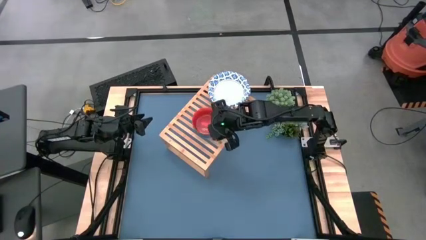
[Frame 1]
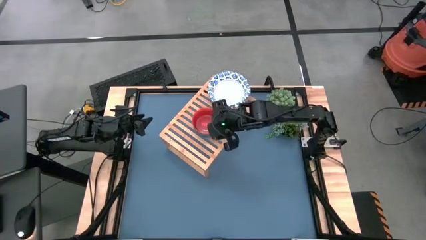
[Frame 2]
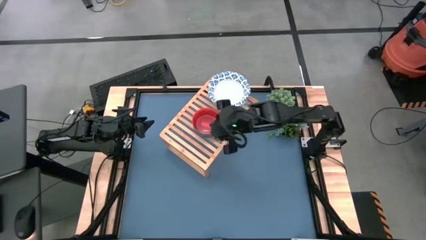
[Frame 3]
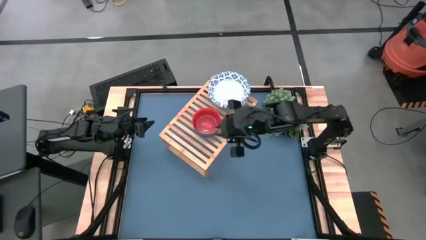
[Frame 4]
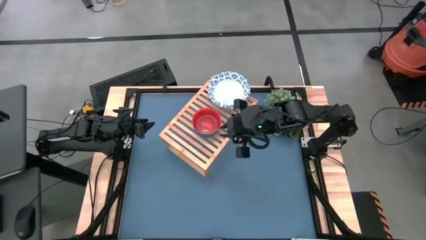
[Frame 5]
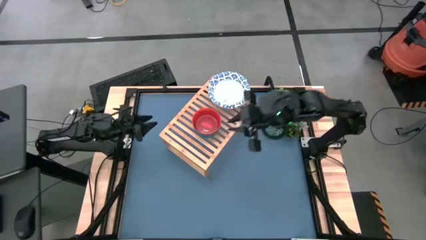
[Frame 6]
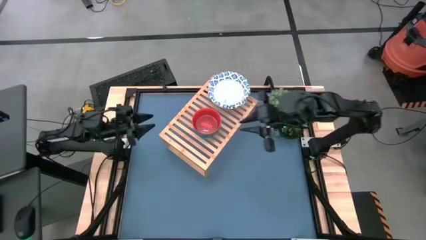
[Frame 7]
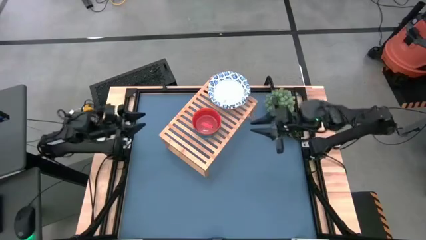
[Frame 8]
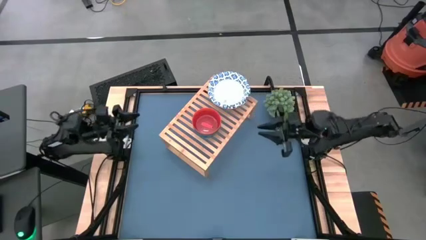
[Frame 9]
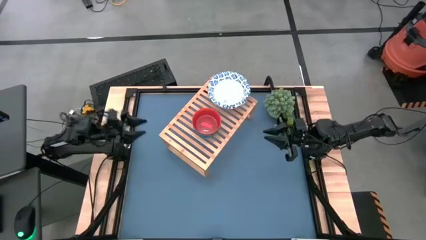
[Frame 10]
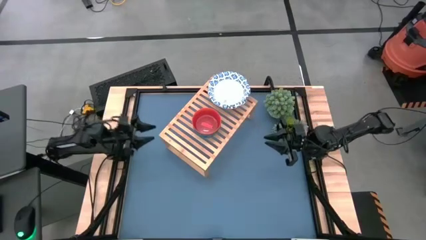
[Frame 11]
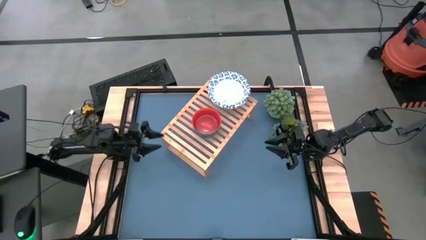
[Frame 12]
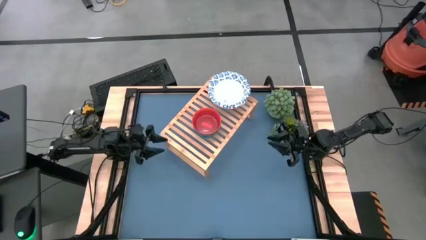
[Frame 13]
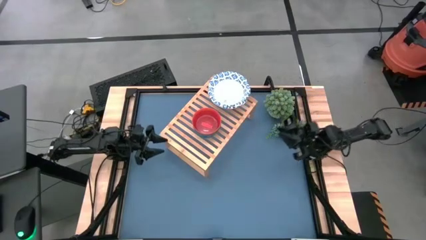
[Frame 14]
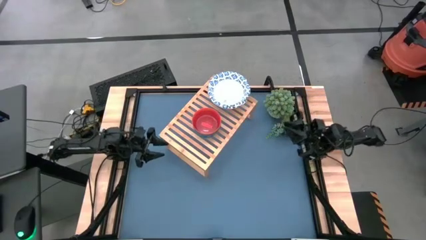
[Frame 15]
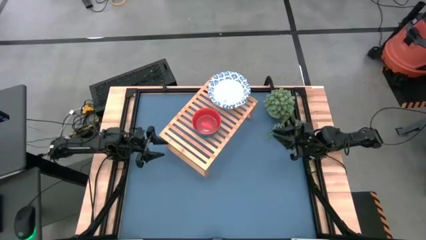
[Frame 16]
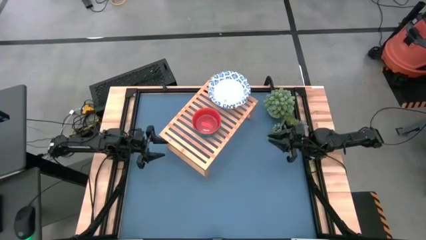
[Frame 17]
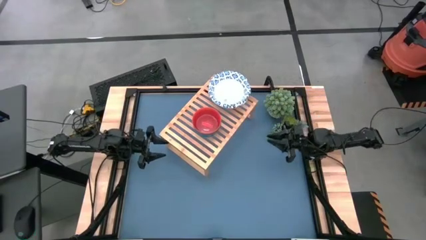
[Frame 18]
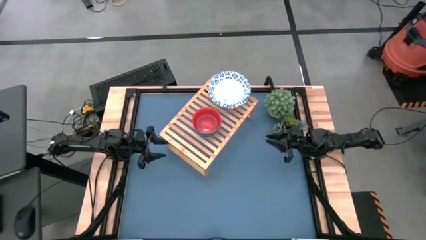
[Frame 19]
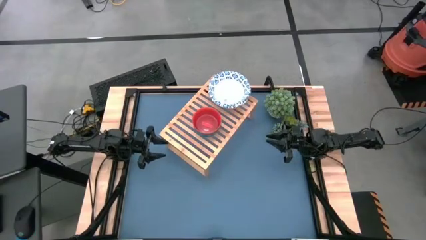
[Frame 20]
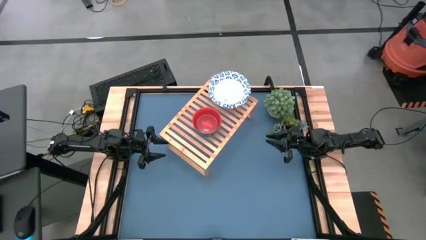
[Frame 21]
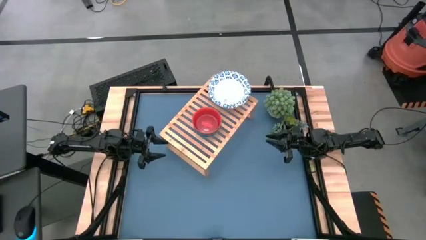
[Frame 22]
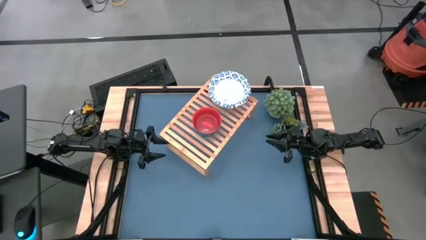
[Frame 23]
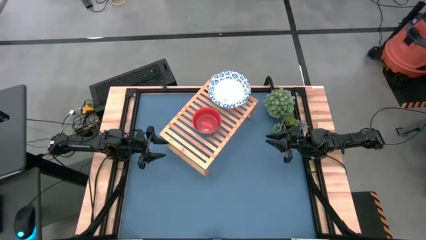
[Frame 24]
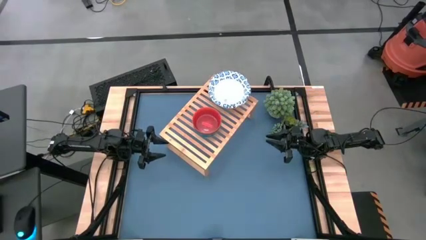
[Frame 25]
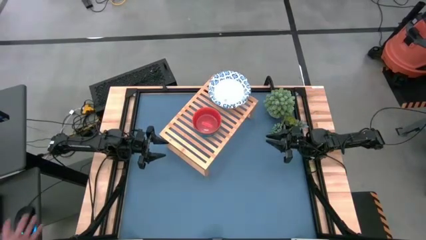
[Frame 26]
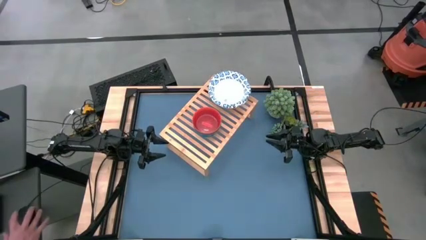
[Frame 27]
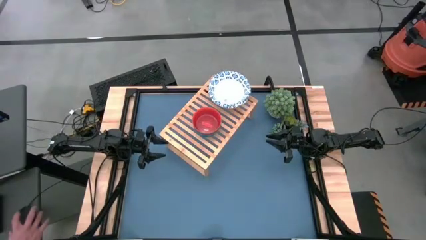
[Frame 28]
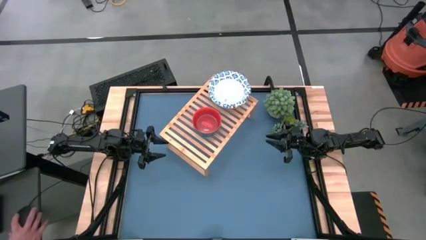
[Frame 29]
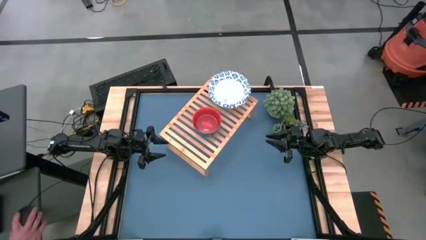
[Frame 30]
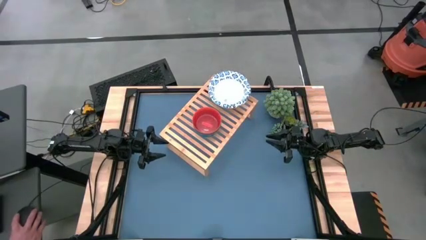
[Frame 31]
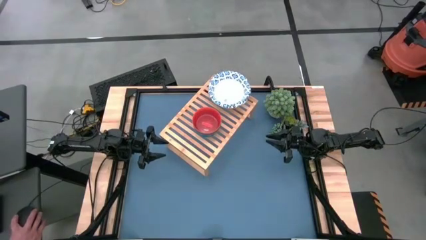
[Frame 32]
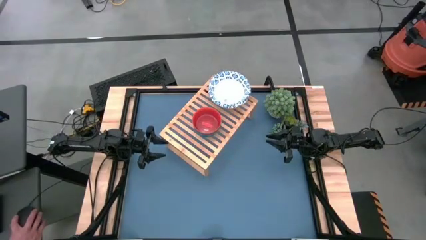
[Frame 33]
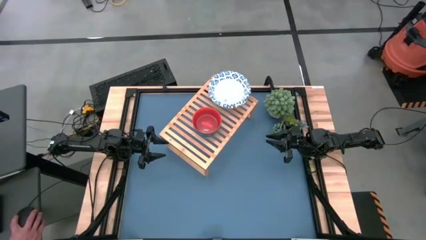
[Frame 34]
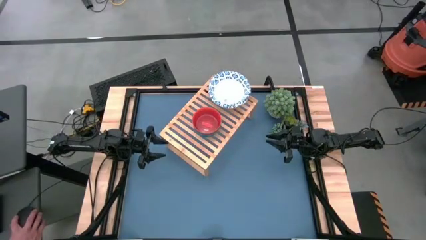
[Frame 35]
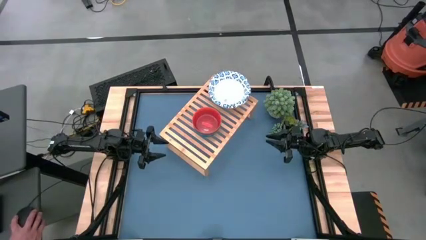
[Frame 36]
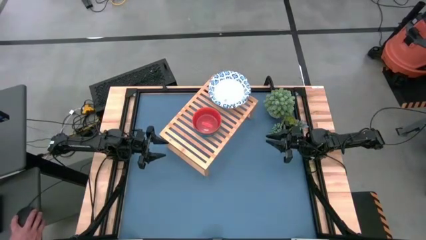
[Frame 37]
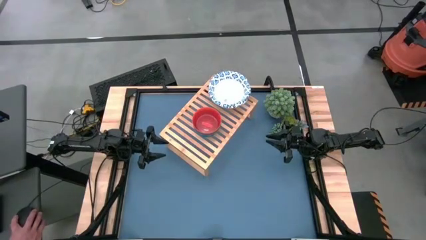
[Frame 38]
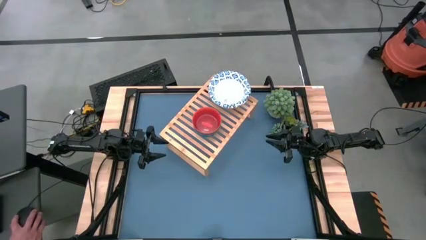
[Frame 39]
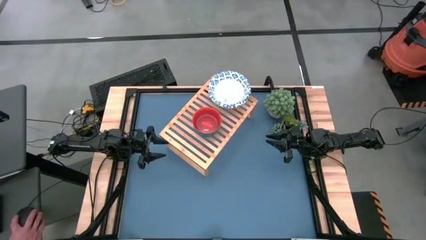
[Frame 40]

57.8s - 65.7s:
Task: Place and stack bowls onto a shelf
Return to Home Position

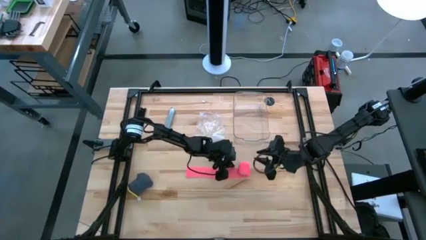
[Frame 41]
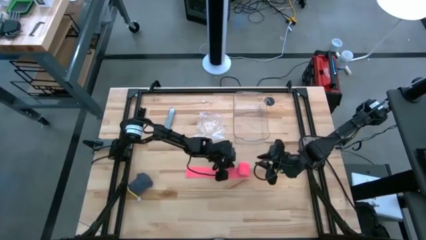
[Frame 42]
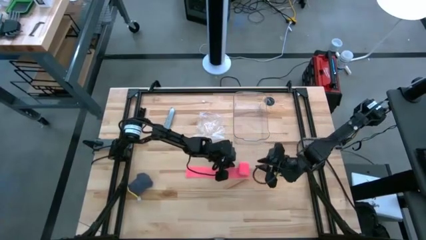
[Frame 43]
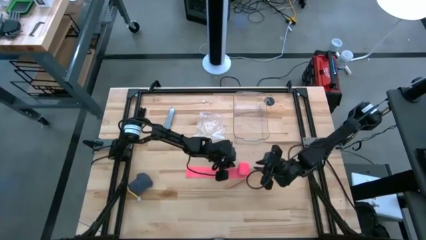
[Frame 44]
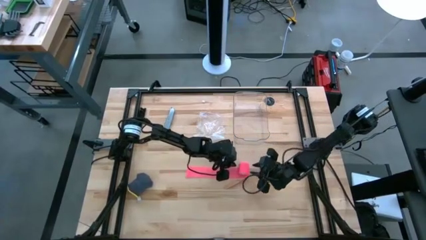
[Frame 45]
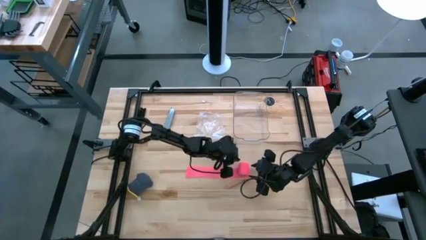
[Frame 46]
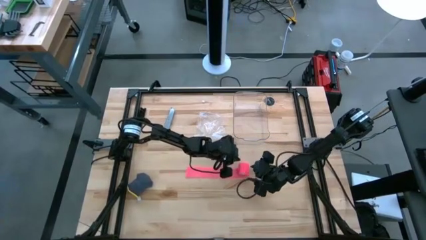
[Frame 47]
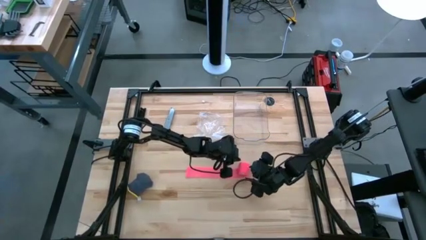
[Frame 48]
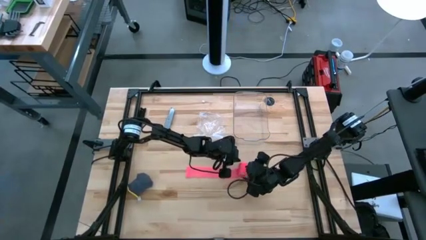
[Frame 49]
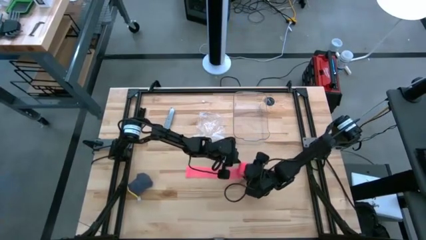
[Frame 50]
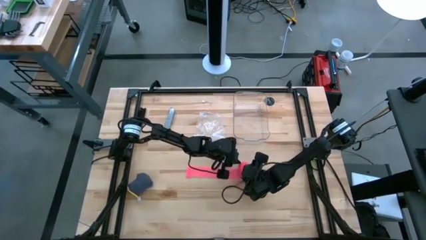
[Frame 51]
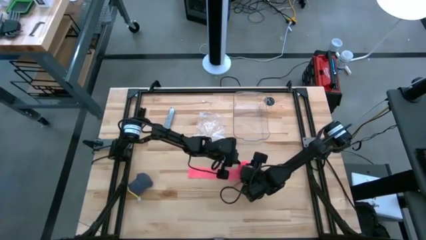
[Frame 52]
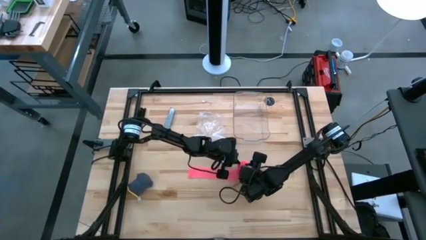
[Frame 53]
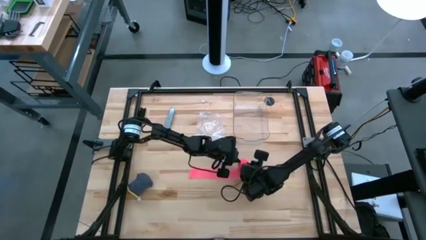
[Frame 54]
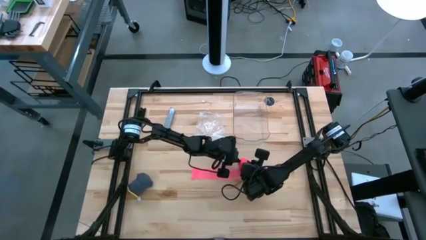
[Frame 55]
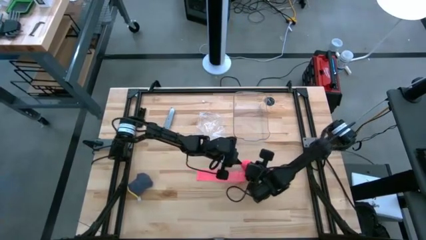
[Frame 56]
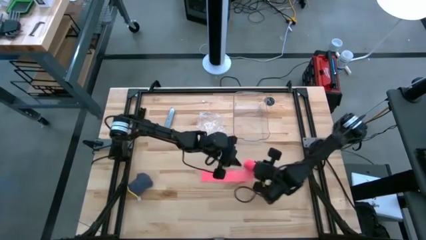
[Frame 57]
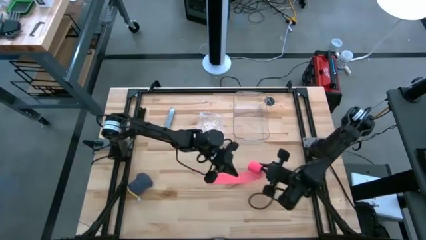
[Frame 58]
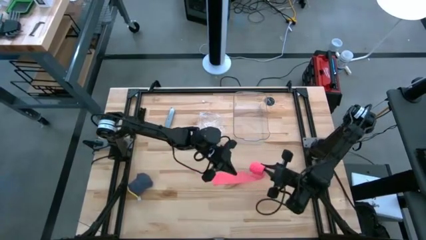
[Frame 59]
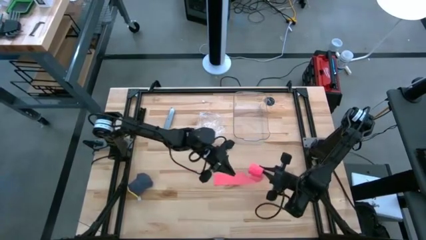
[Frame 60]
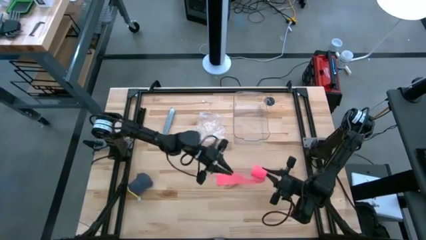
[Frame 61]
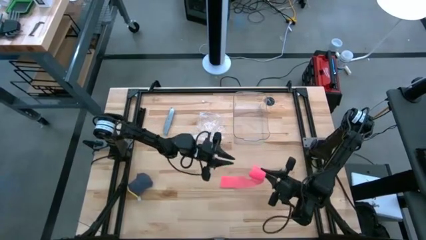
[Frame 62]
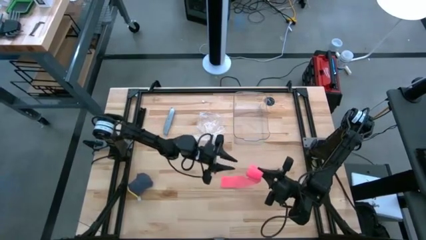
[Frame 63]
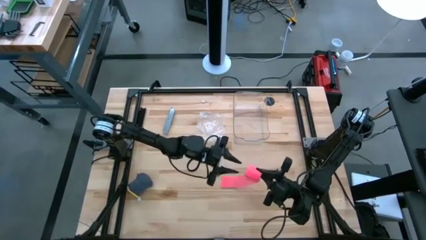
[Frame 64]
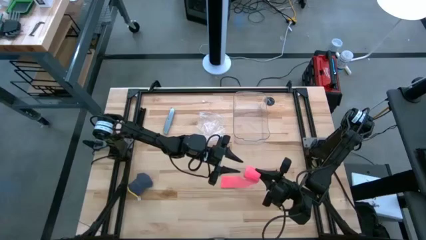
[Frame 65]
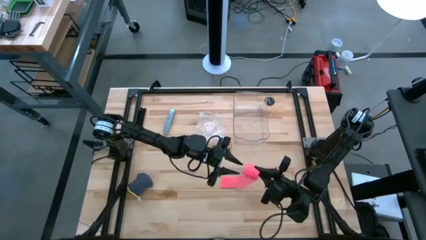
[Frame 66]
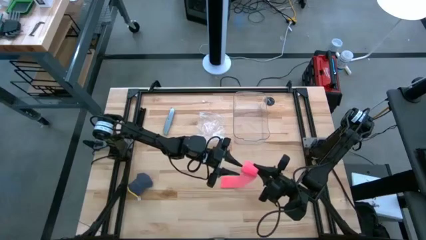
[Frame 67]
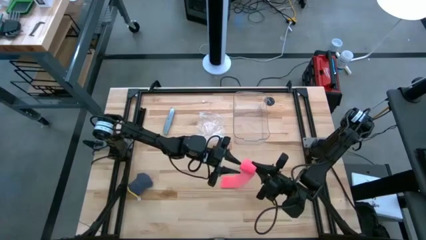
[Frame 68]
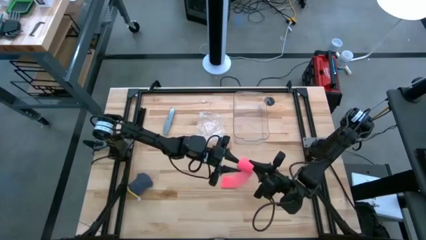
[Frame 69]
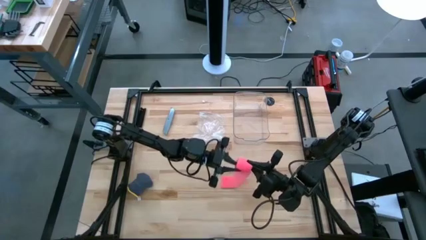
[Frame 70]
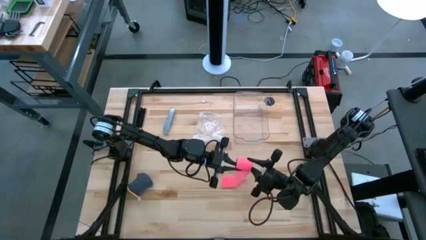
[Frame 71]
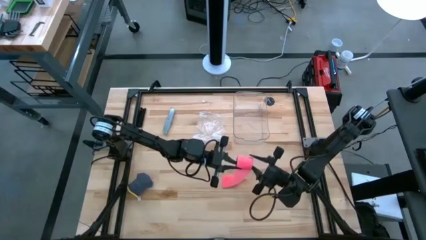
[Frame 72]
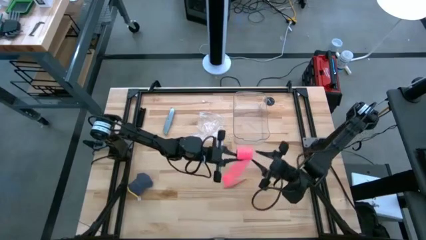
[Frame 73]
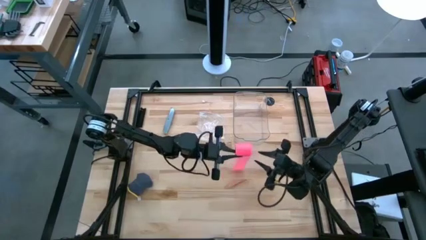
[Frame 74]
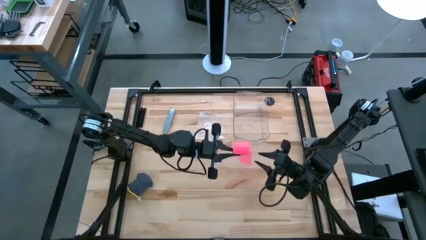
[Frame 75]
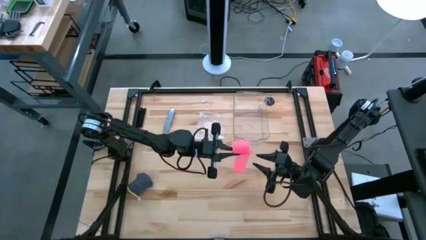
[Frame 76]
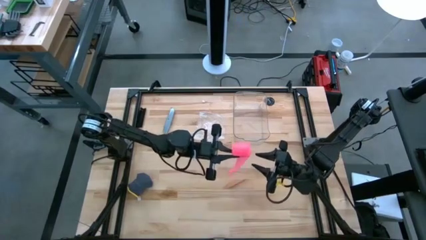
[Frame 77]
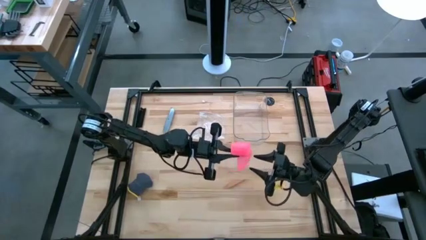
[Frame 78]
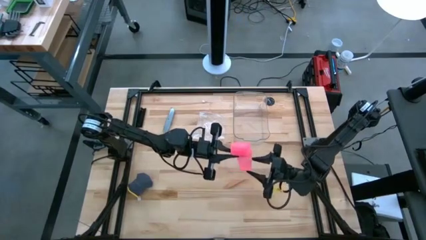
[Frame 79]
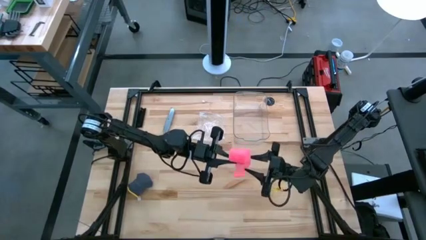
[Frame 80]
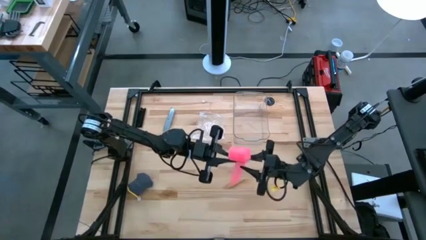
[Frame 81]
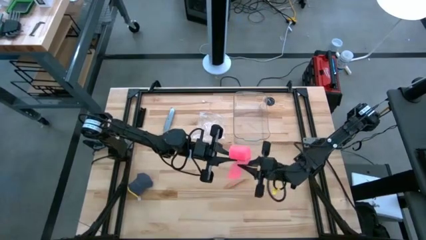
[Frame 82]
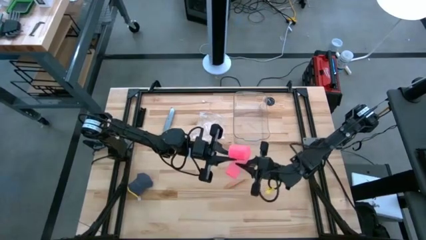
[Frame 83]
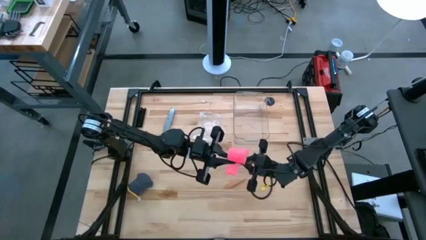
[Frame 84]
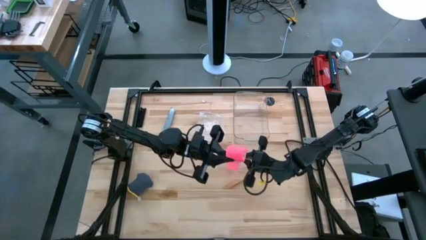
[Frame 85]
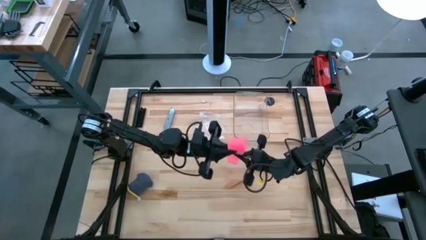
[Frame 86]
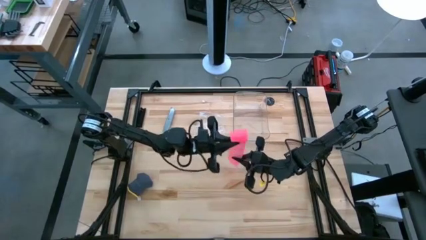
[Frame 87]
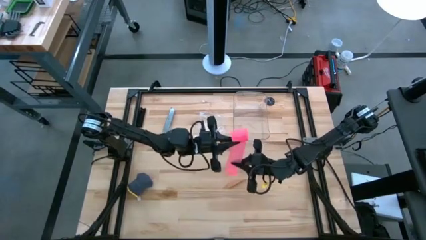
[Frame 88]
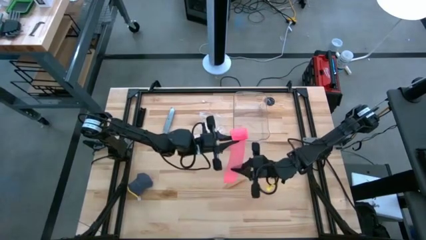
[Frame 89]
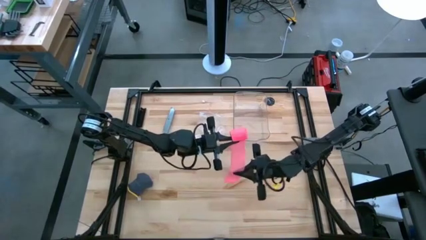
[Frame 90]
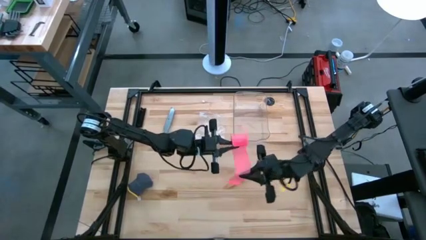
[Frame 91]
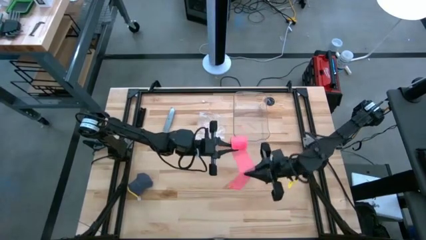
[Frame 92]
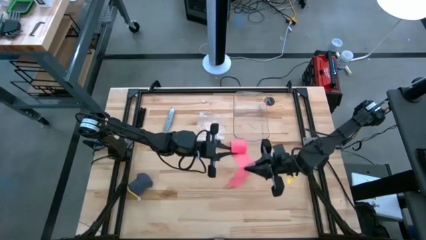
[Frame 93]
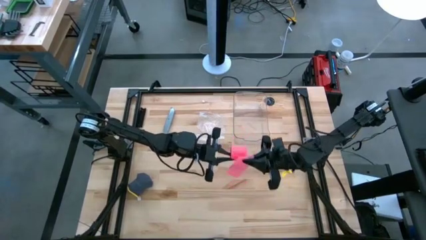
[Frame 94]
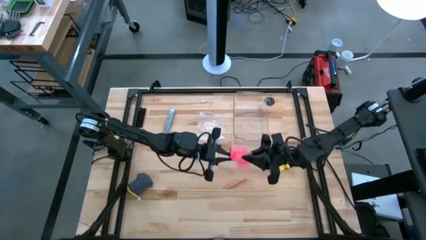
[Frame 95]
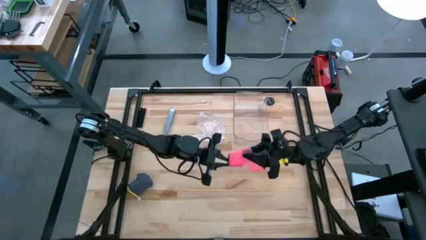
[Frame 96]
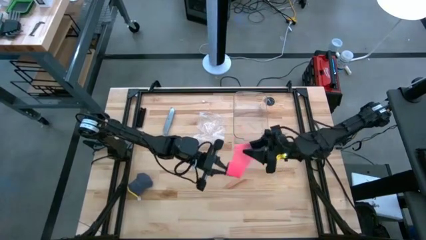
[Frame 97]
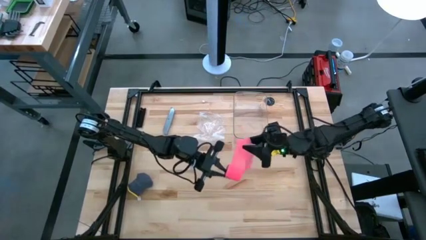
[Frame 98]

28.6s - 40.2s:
Task: Roll bandage
Roll the pink bandage
